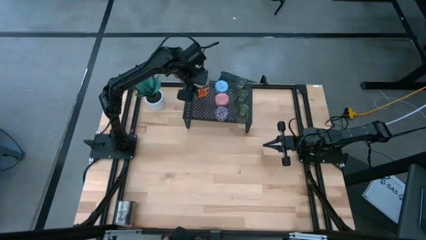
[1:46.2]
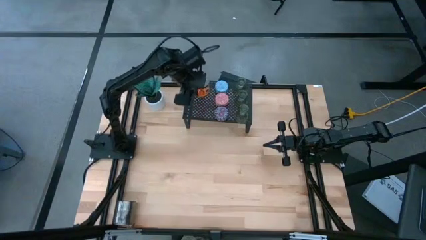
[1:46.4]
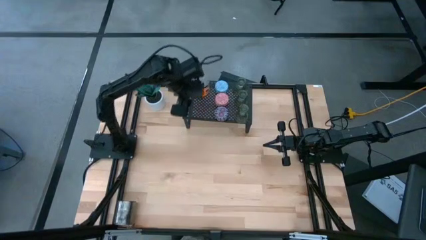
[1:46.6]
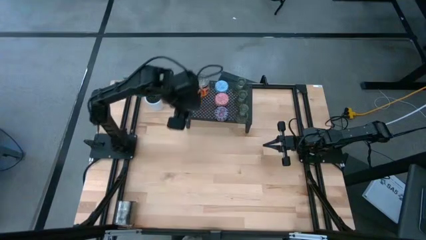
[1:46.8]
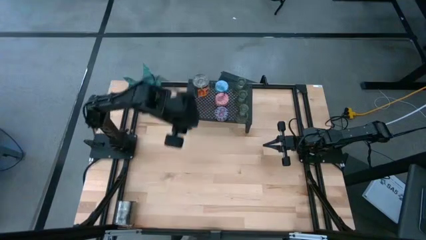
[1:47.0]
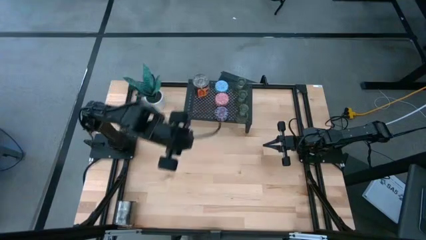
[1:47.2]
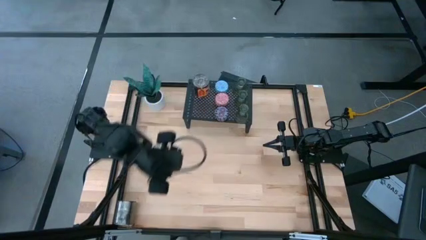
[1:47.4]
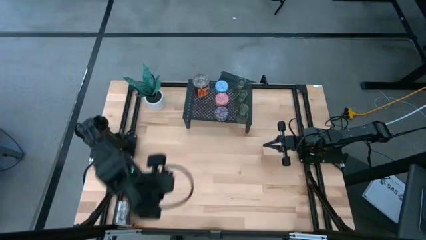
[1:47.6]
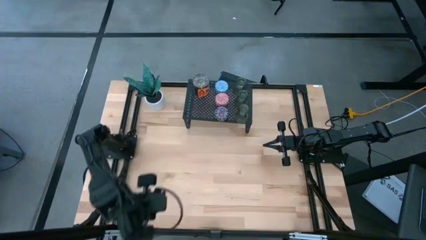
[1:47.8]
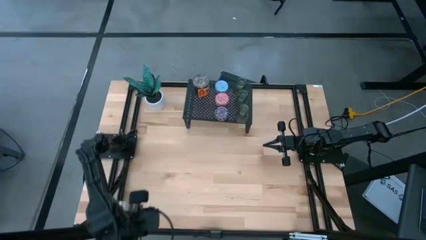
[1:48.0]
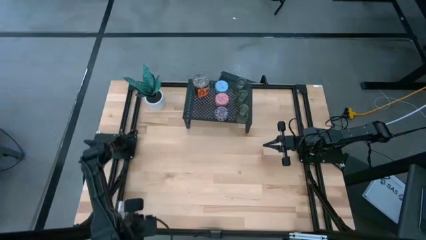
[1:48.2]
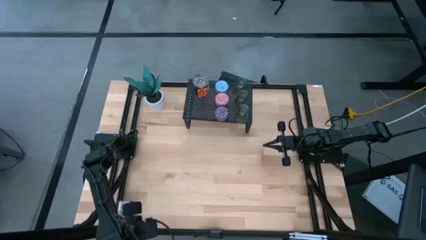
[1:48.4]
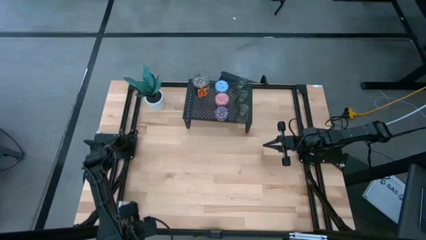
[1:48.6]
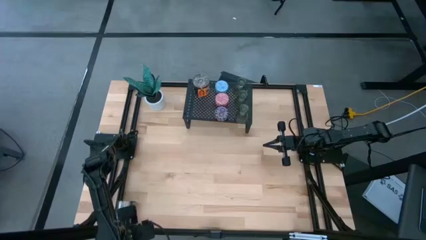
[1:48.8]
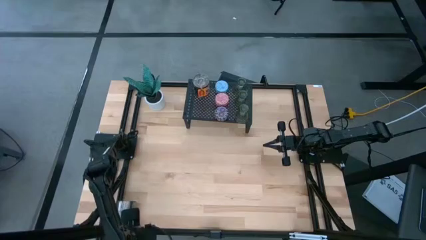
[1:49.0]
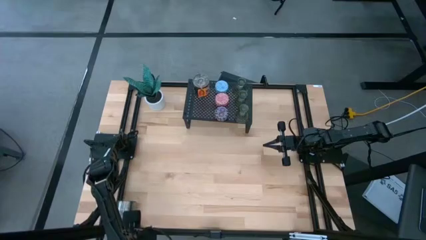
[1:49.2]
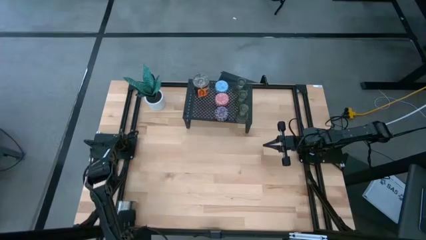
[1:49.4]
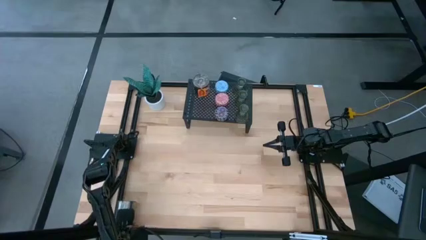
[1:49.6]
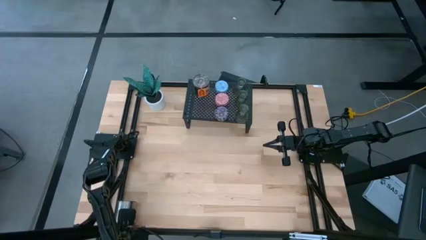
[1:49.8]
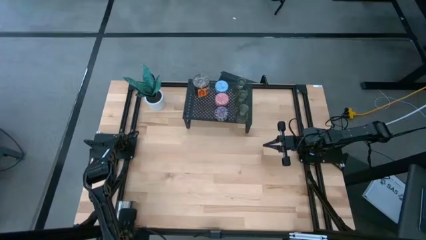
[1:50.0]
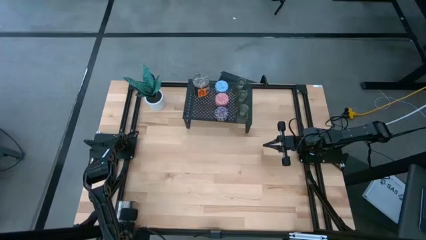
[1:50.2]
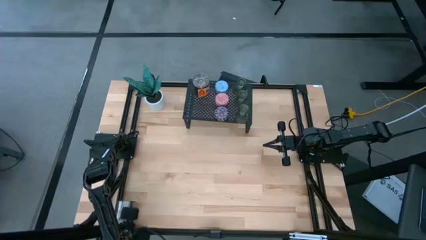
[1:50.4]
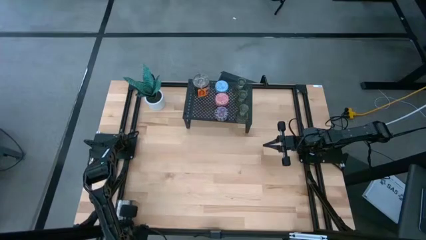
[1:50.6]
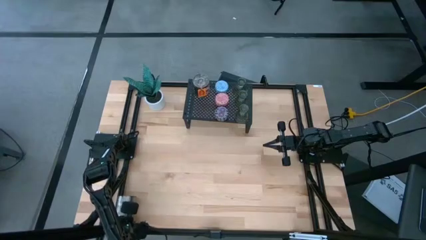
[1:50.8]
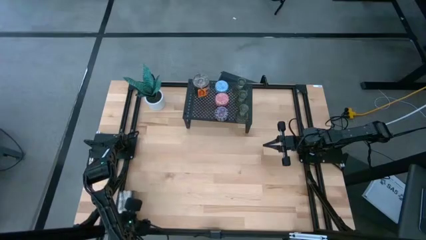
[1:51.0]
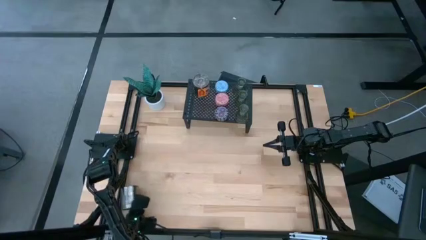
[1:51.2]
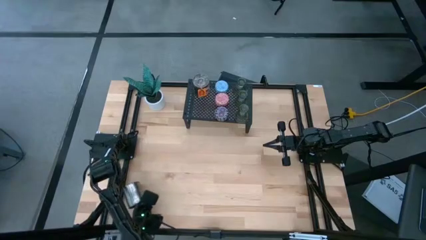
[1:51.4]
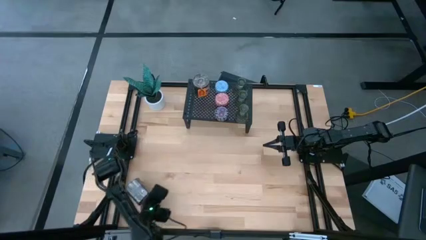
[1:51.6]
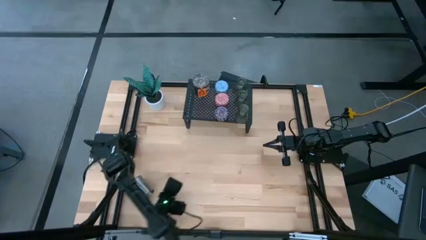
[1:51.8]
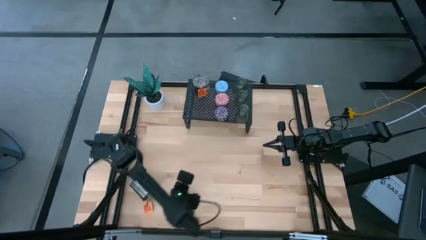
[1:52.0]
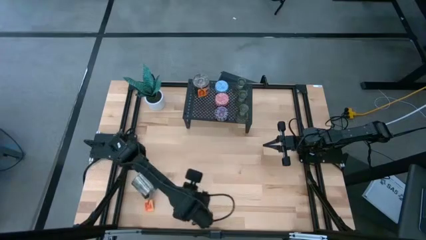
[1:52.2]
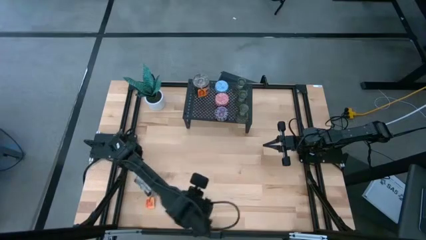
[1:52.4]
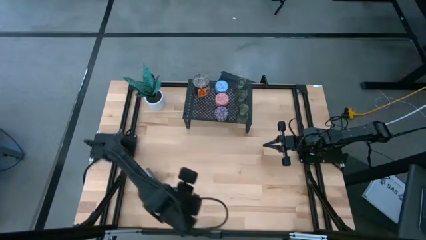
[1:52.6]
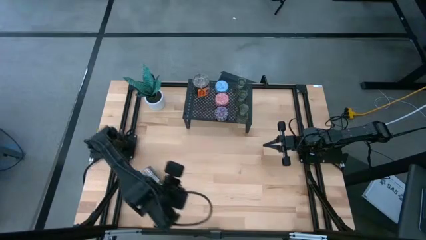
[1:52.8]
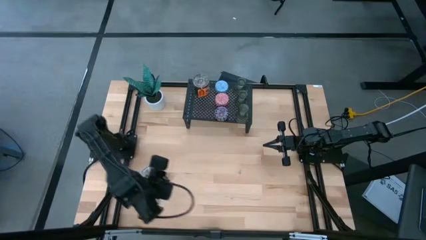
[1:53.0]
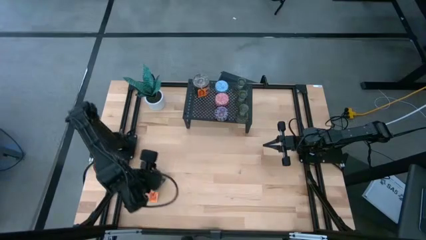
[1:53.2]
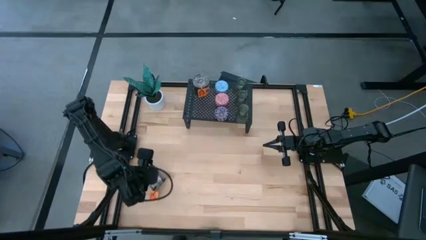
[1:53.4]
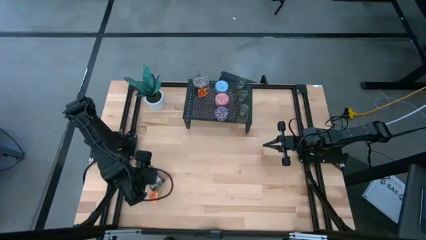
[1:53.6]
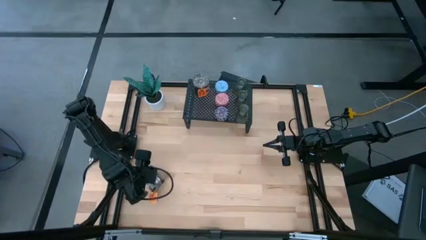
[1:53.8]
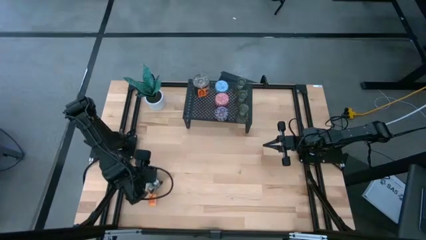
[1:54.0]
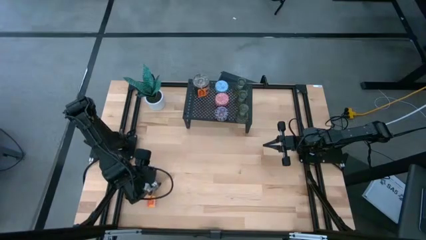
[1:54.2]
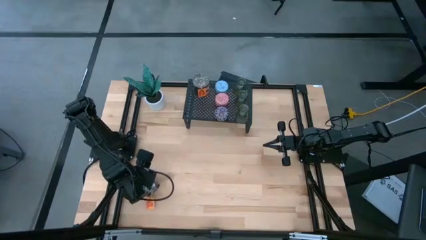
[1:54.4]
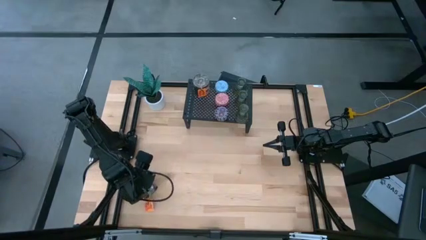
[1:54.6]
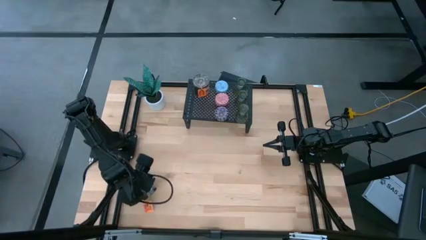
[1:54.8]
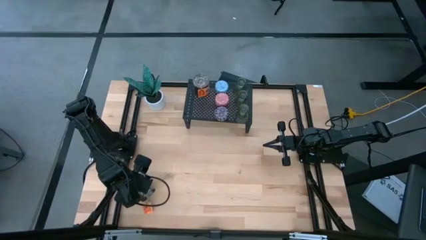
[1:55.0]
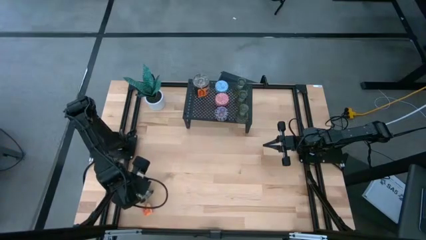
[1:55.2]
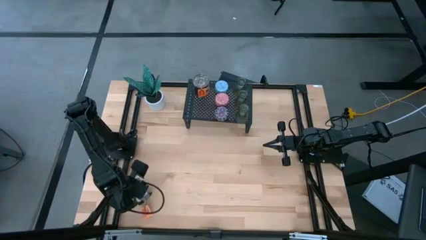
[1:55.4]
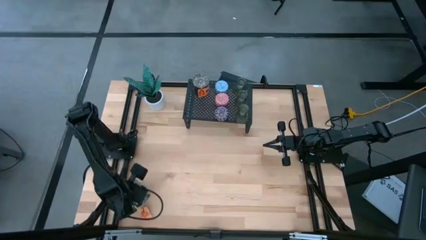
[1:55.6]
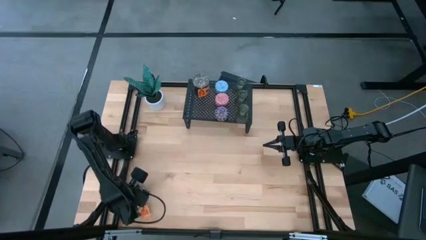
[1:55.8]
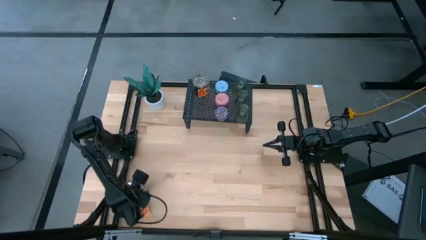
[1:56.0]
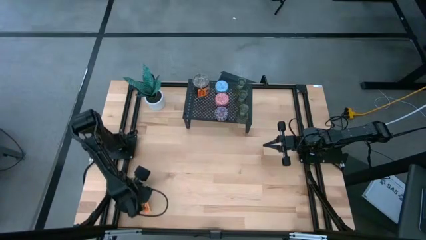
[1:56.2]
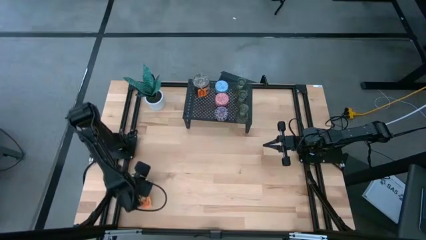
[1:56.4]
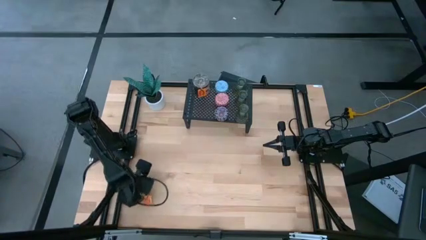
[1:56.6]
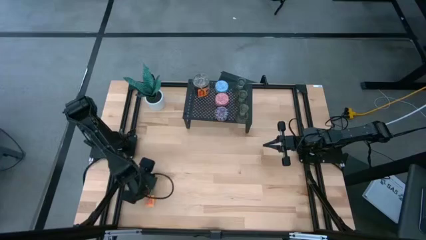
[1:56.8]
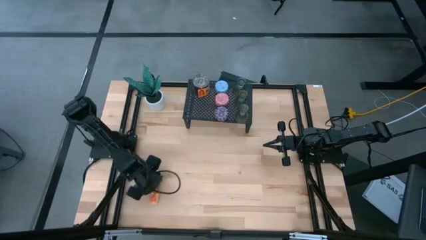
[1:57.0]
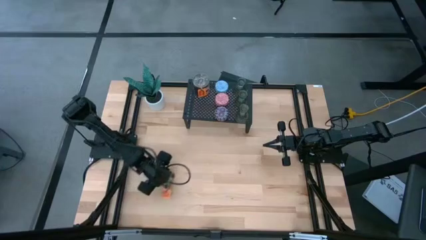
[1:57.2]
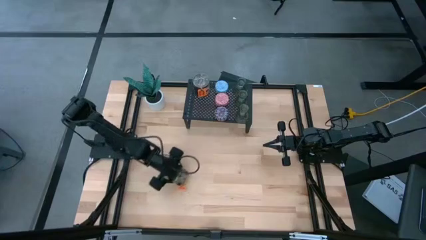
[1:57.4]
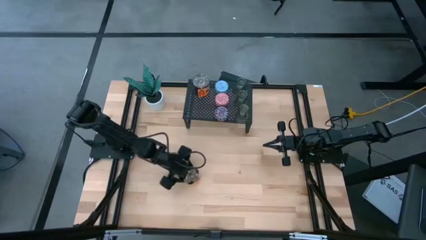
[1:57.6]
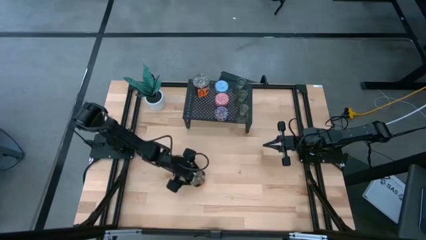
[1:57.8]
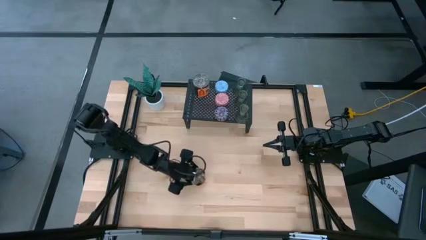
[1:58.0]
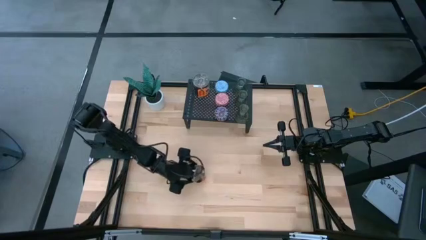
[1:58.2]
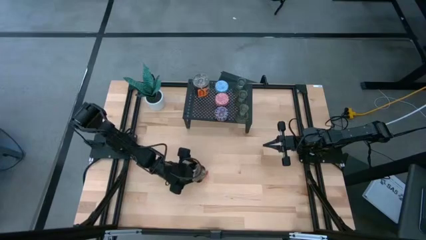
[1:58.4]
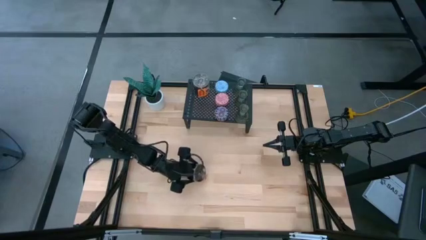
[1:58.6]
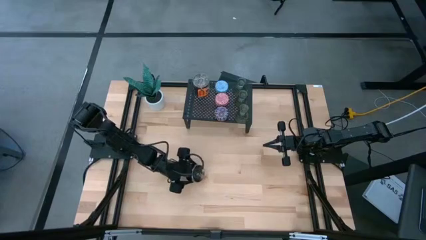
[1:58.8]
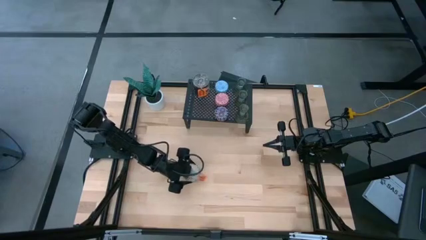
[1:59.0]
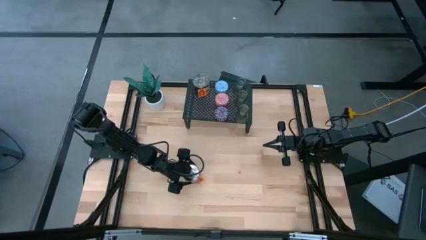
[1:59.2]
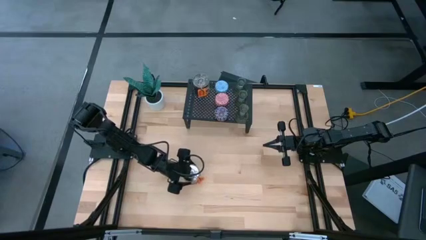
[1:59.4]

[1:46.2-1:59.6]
Task: Pick & Place candle stick holders
Put the scented candle can on the shelf
